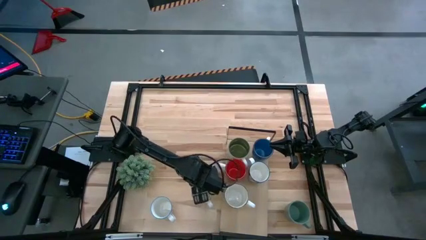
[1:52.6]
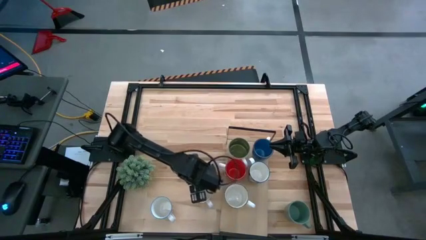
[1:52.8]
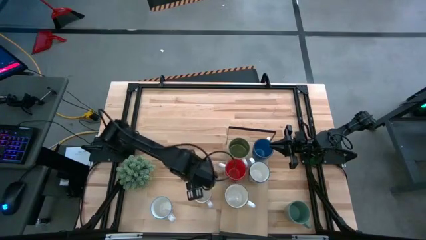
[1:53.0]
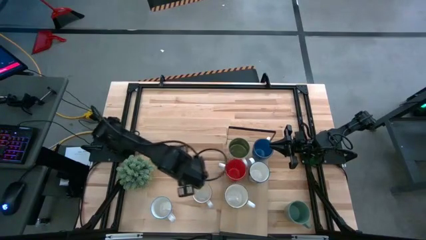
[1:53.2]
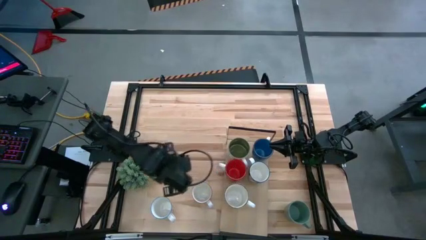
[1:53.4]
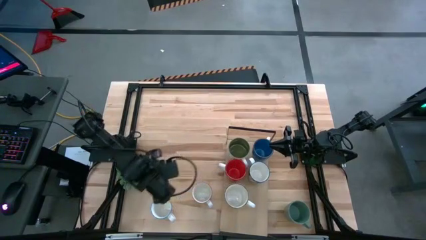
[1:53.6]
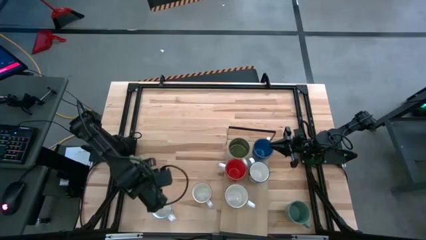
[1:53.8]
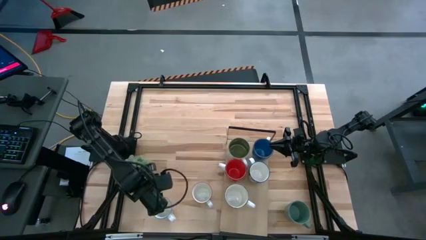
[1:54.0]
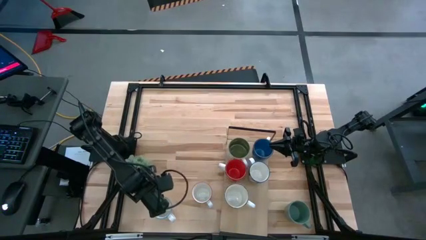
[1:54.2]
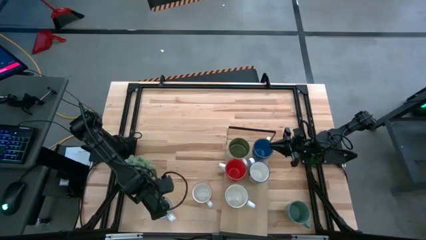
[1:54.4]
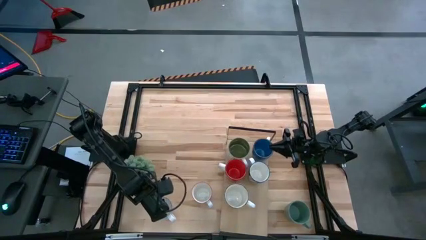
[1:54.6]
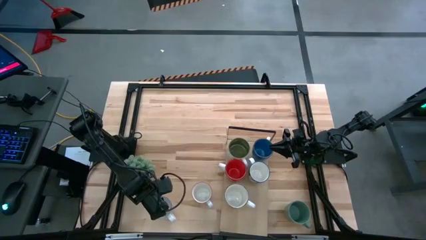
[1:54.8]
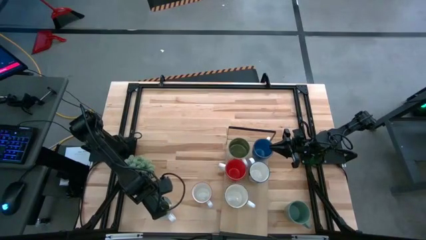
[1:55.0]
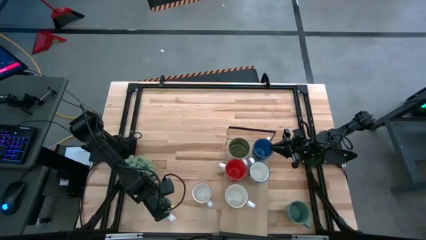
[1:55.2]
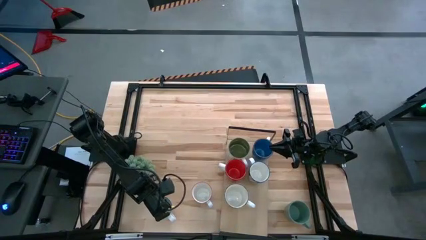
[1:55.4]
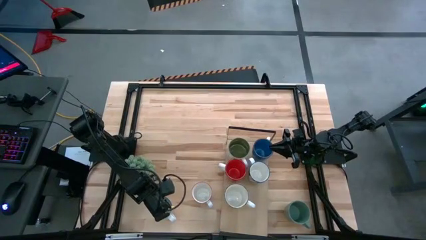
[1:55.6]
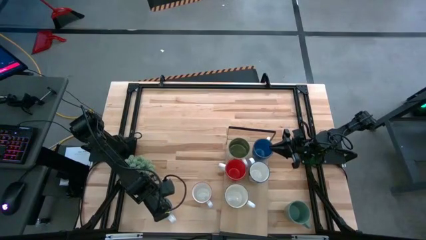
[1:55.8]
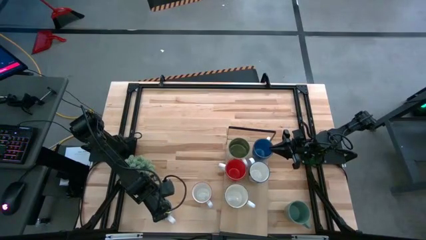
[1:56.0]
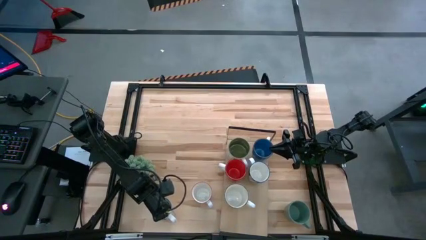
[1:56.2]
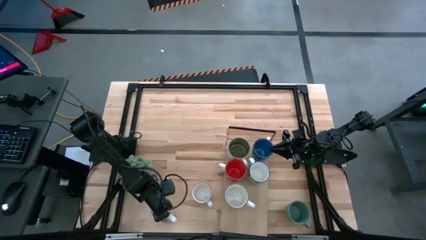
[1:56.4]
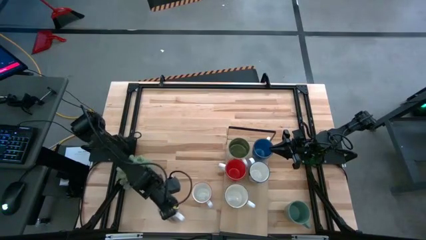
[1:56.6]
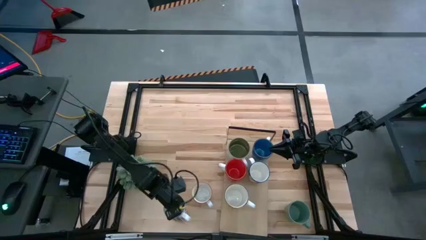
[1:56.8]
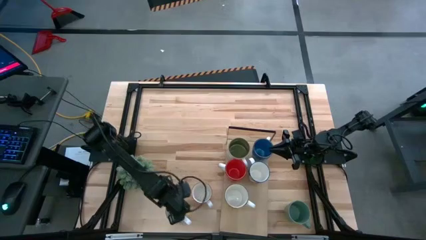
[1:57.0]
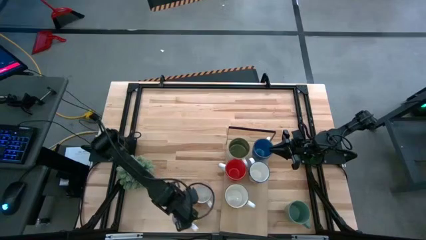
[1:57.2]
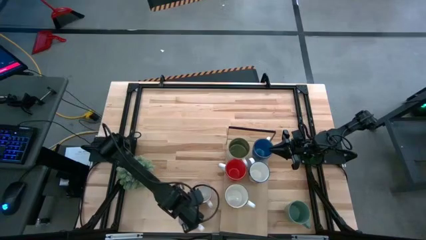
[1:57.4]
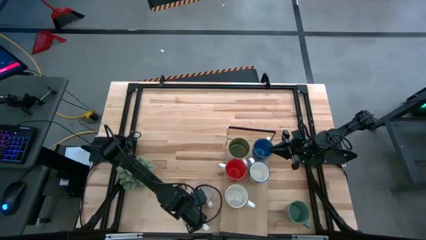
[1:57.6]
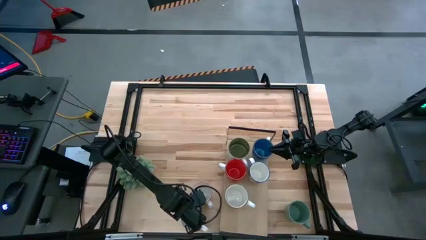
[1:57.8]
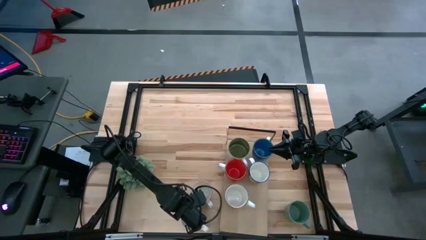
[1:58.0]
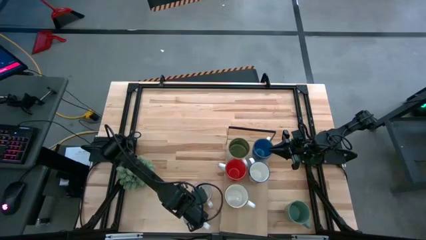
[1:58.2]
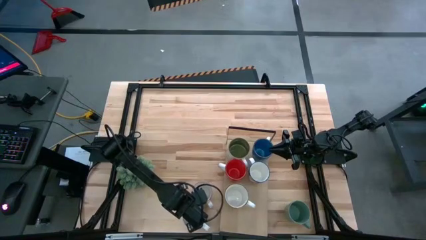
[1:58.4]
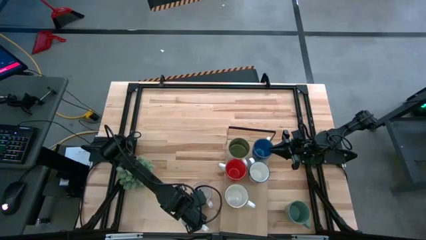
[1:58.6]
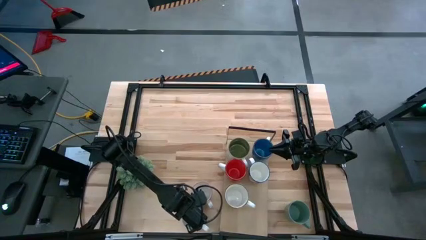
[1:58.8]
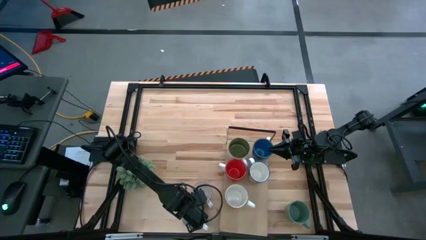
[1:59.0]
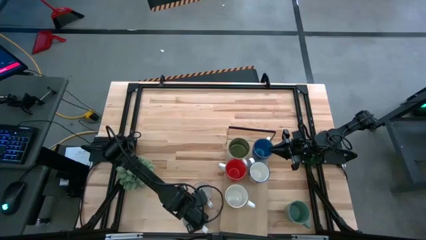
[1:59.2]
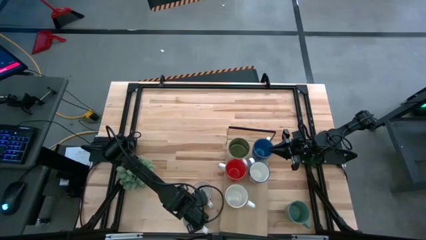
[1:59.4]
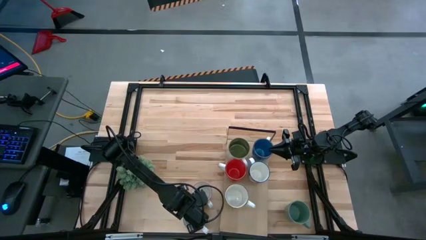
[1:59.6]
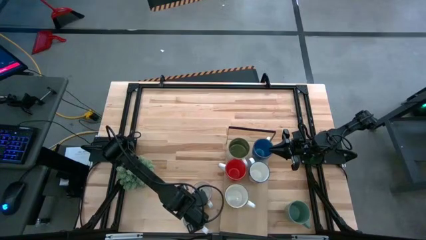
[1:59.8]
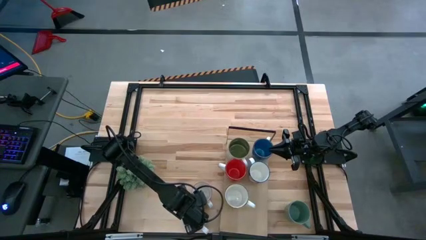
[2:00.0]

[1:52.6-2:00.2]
Task: Place coffee mugs
Move the red and white mug to the lower middle of the table

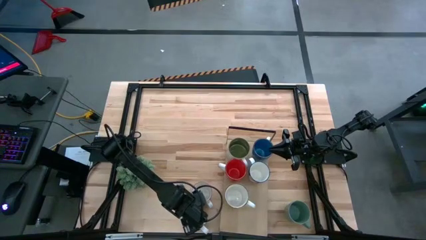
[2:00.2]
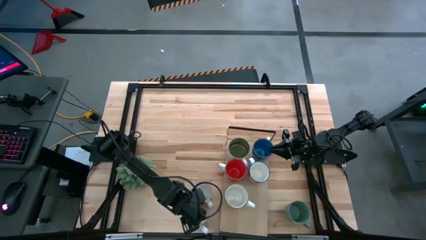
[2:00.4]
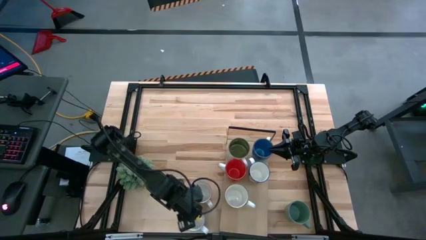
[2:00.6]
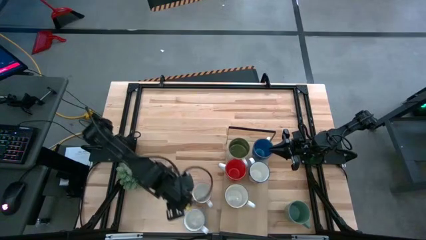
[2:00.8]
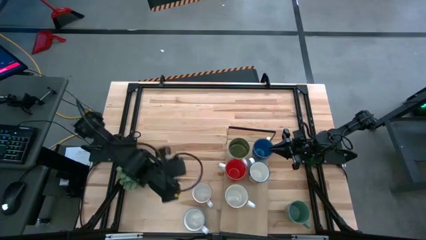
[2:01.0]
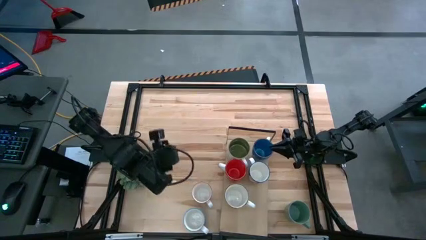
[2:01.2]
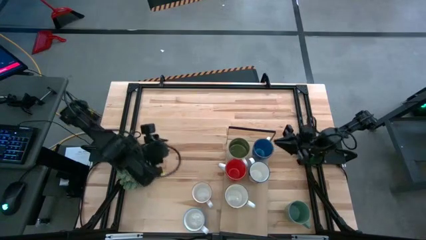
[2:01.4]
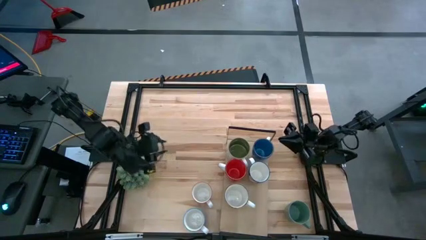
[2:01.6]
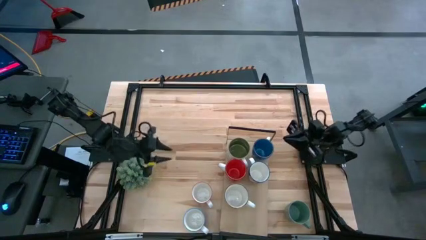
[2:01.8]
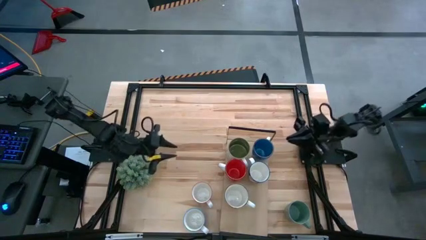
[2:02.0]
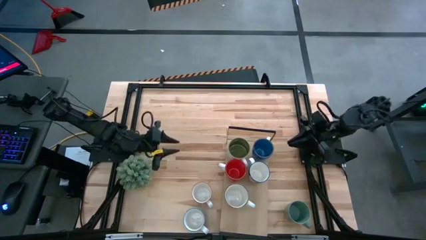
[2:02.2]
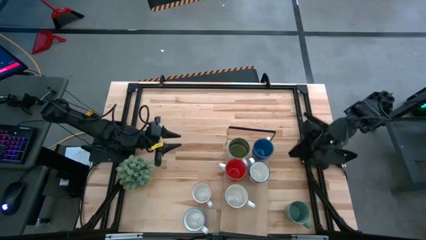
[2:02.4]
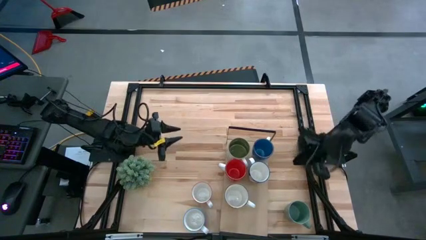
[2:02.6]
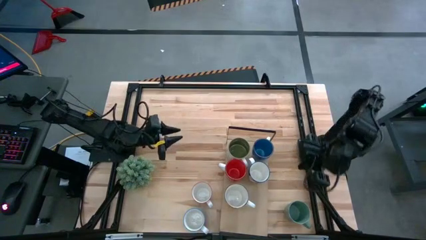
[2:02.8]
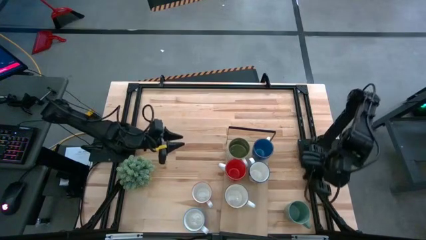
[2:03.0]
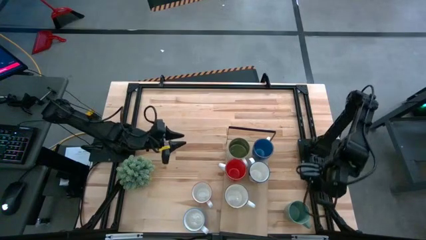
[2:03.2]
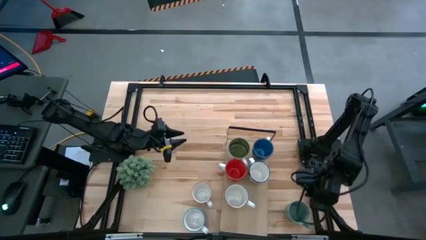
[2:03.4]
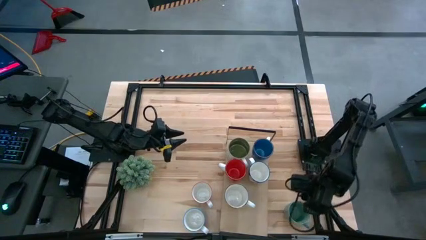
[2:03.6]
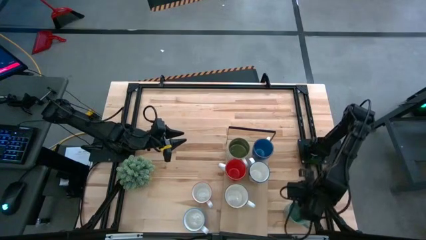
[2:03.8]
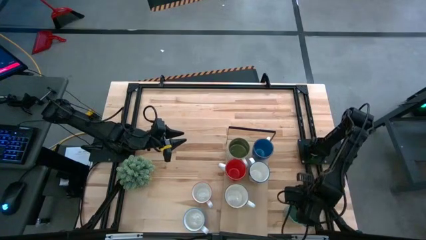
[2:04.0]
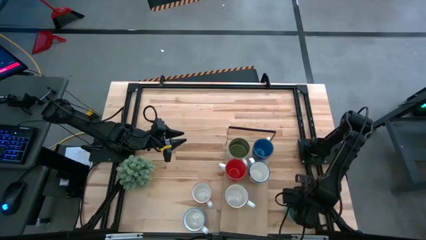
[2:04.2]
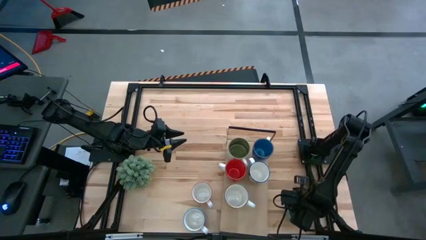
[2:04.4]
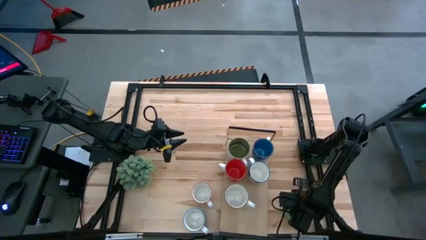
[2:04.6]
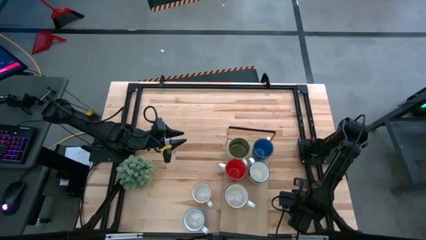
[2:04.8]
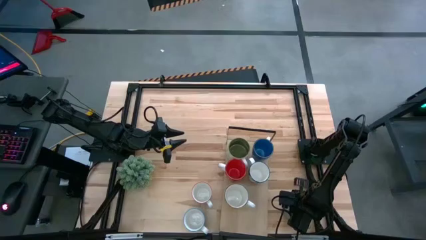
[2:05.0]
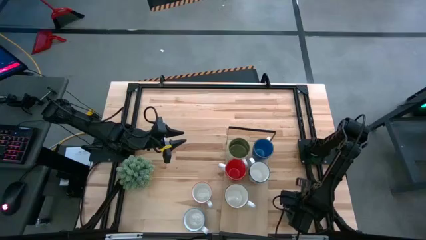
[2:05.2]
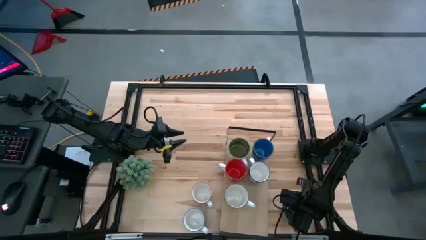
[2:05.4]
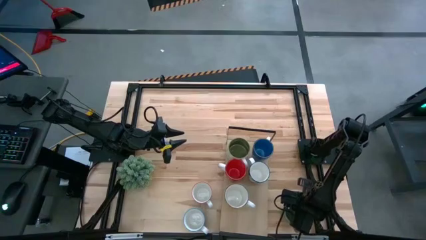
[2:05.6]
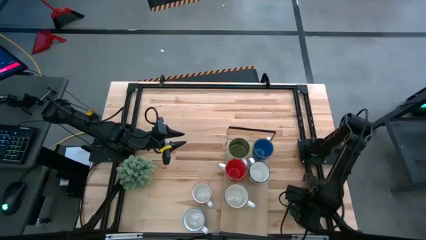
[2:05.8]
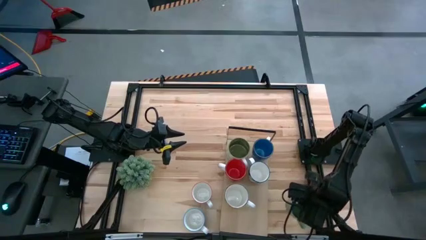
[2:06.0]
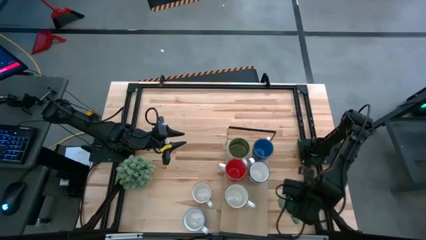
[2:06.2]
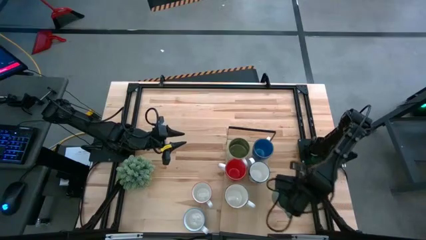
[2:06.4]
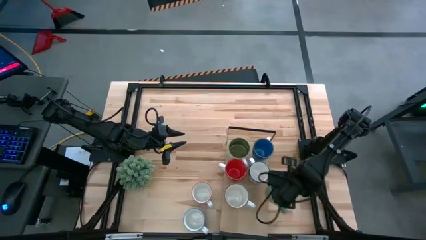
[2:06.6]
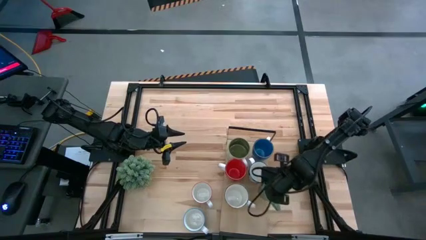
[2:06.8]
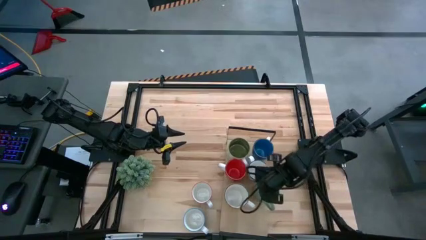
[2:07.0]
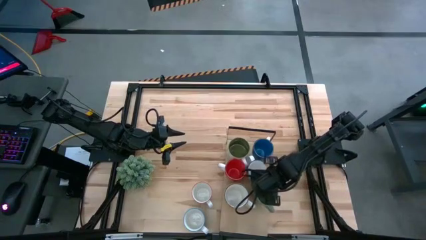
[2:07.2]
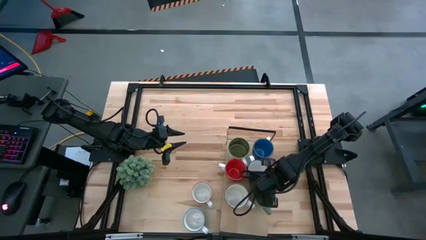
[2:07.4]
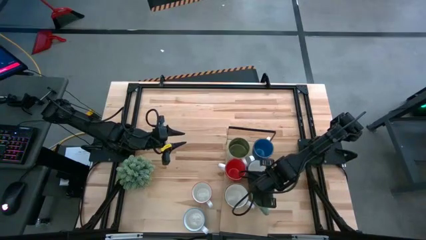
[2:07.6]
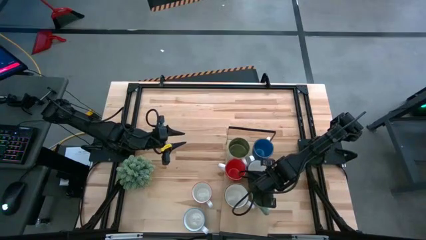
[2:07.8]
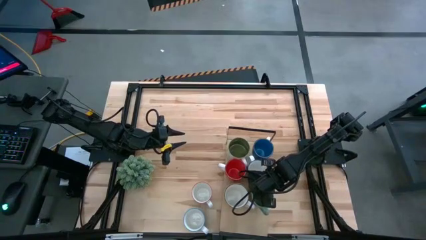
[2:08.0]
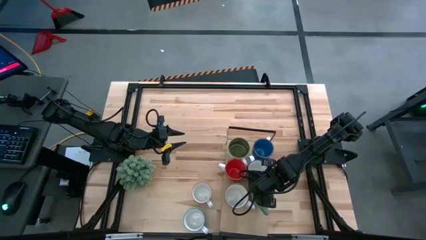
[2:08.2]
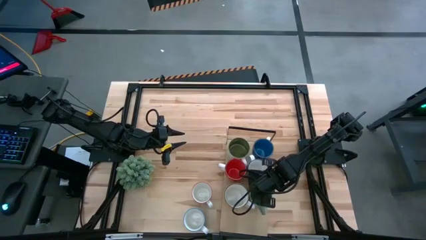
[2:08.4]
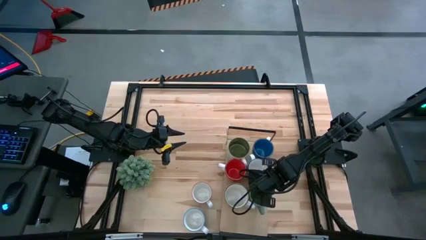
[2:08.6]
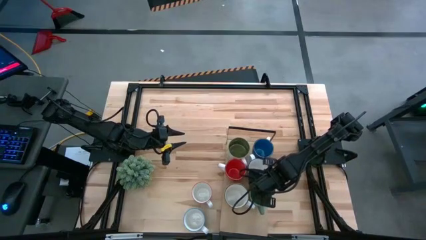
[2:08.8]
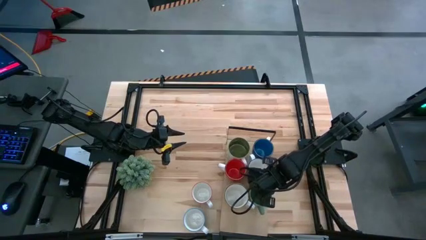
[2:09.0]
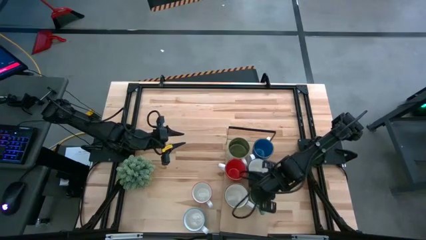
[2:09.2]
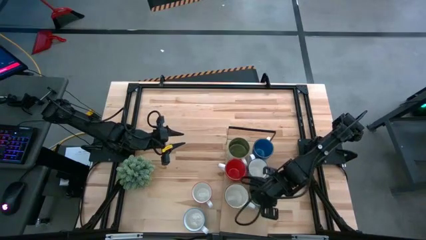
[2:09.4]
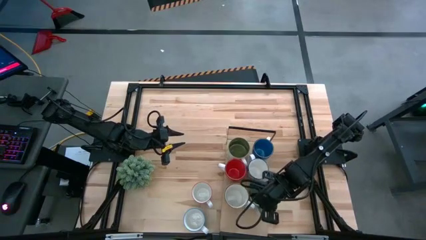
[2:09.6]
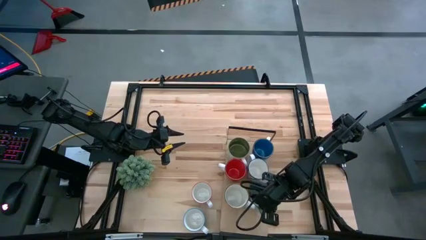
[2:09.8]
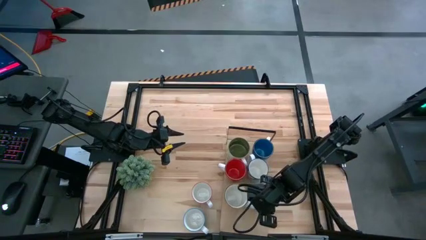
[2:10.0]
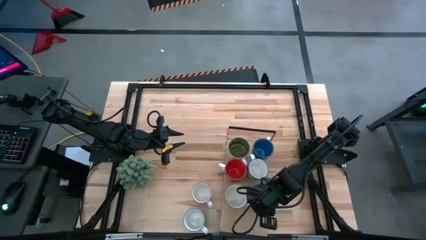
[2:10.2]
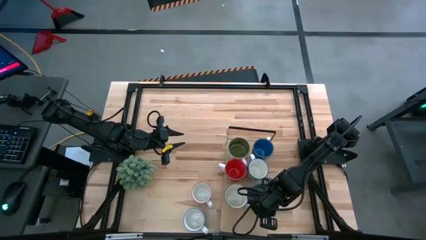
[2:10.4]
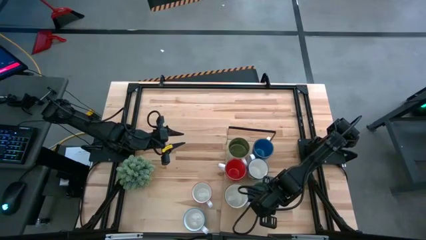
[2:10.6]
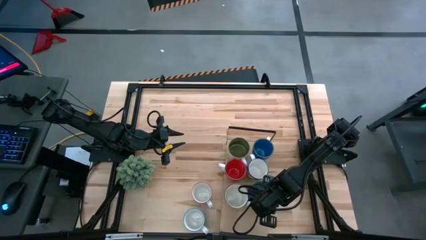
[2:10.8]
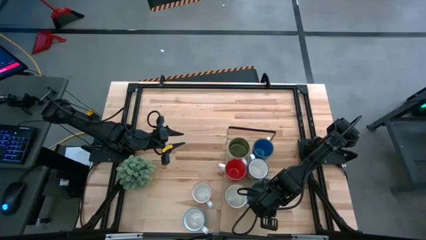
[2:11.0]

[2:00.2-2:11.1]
Put the light green mug on the shelf
